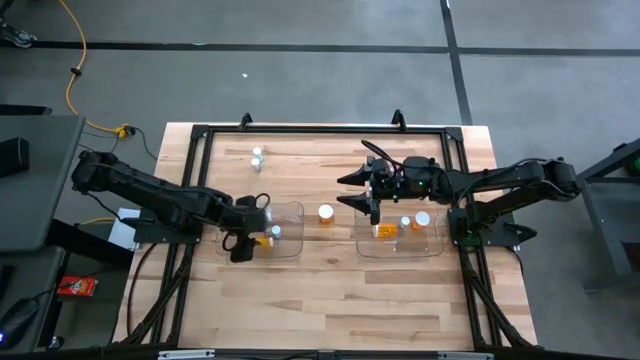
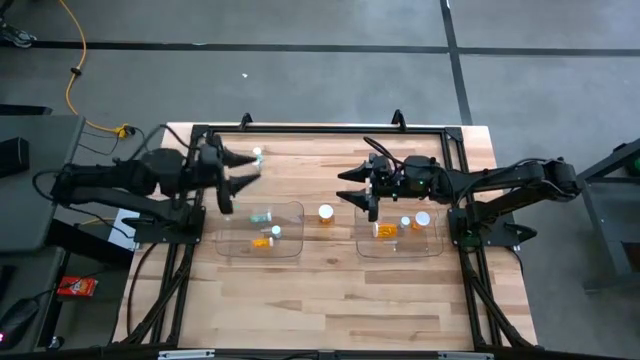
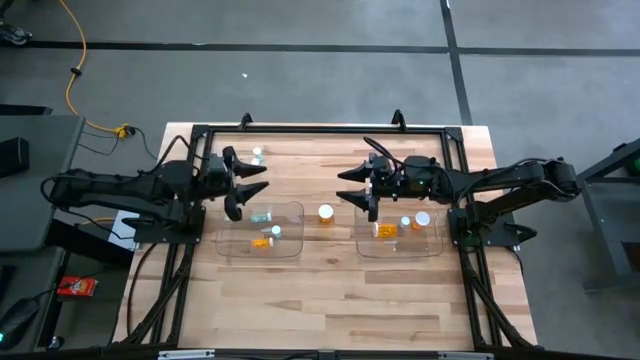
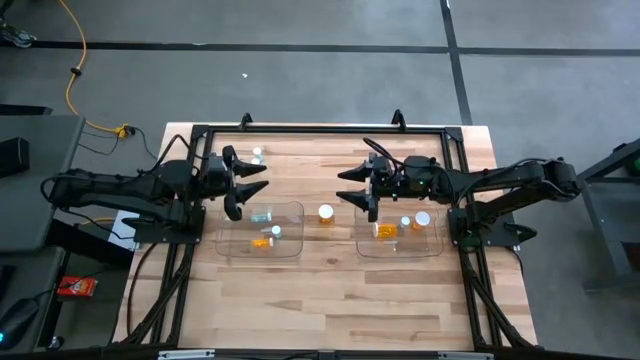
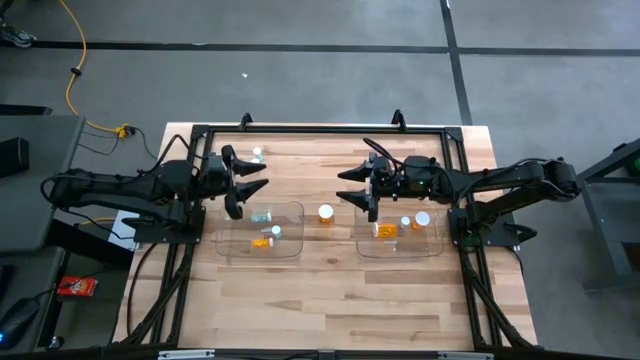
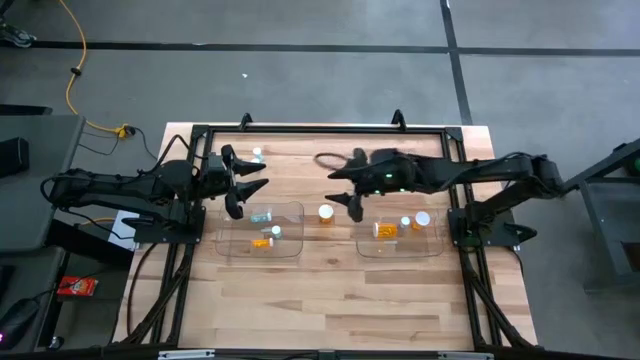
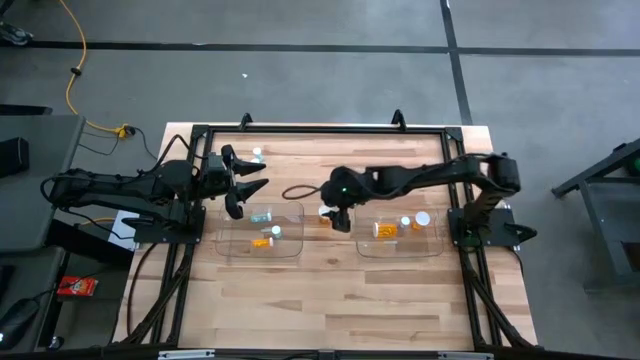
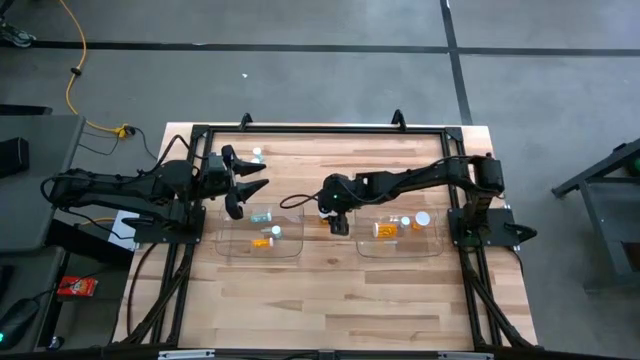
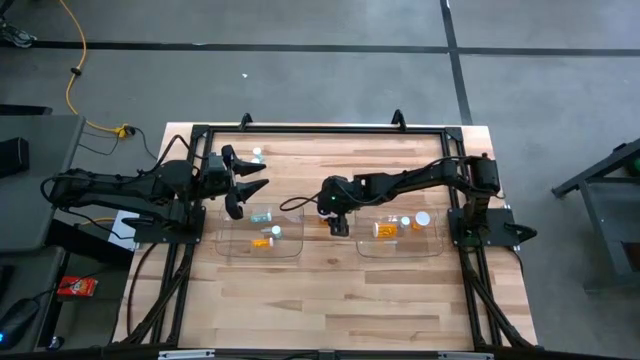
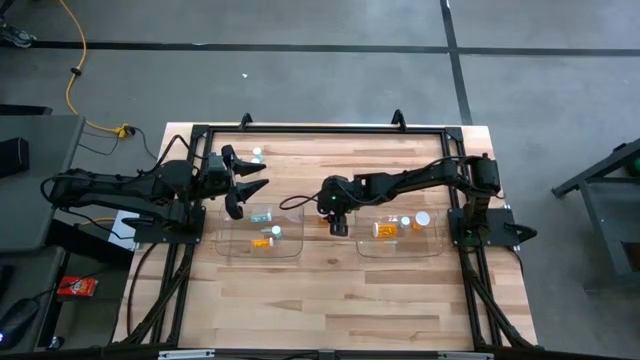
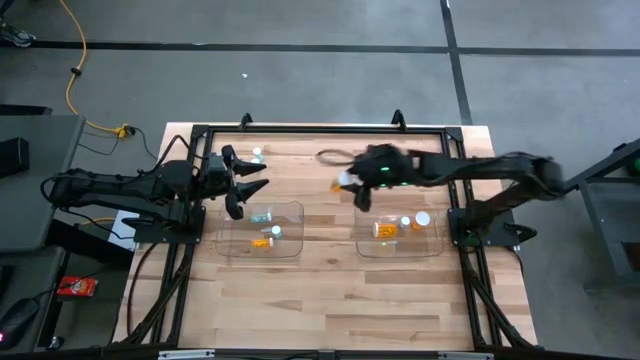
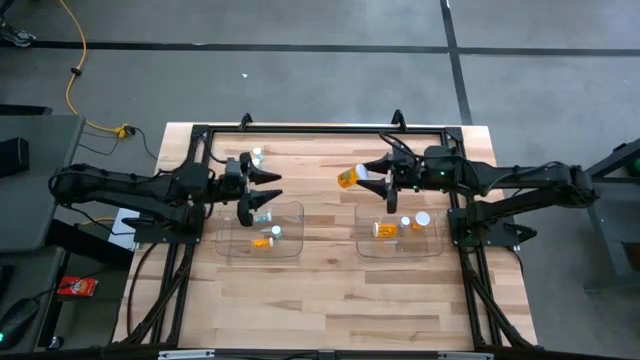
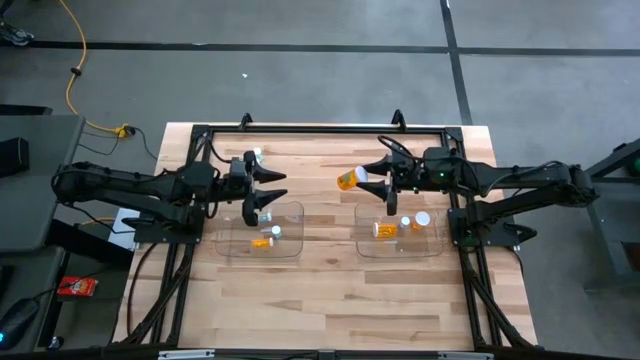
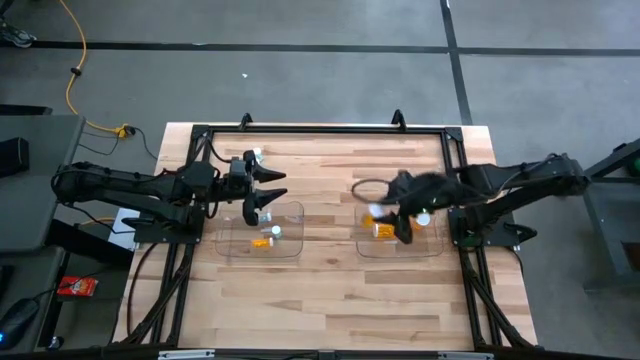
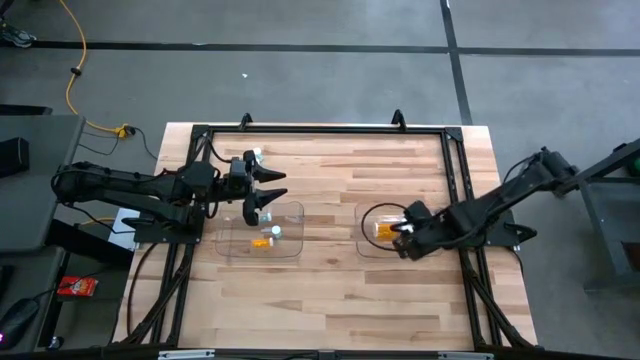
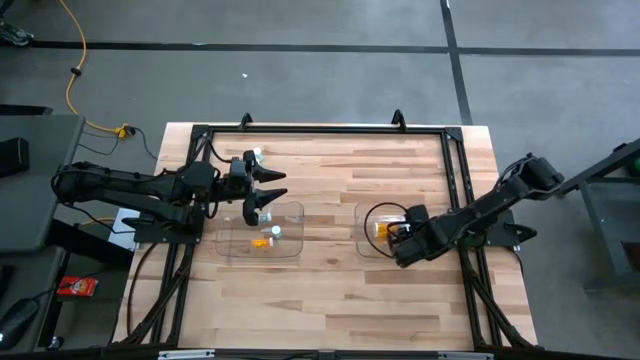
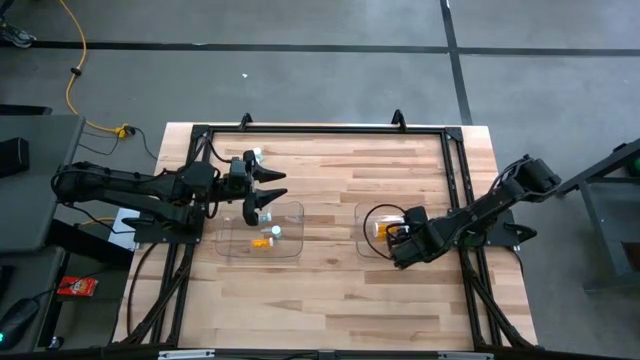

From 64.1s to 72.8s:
Task: Pick and place medicine bottles into bin by pill shape (circle, oval)
Put the orange capsule bottle into the right transparent bin

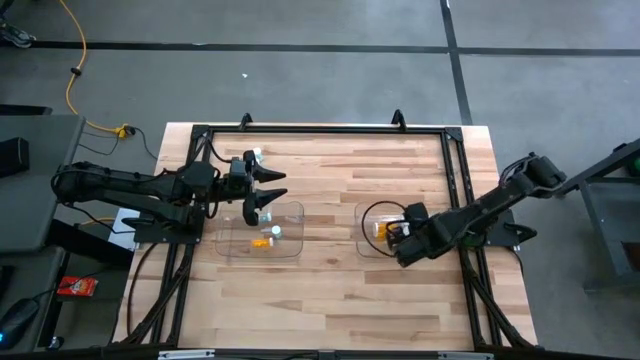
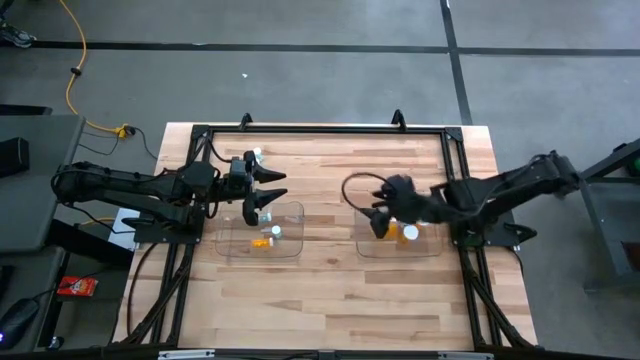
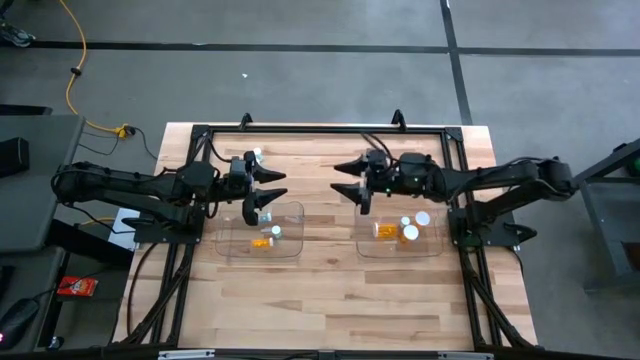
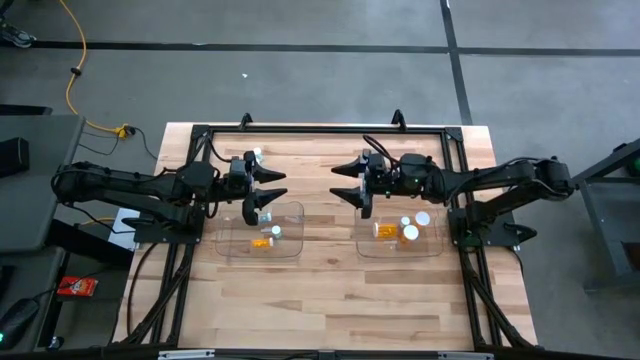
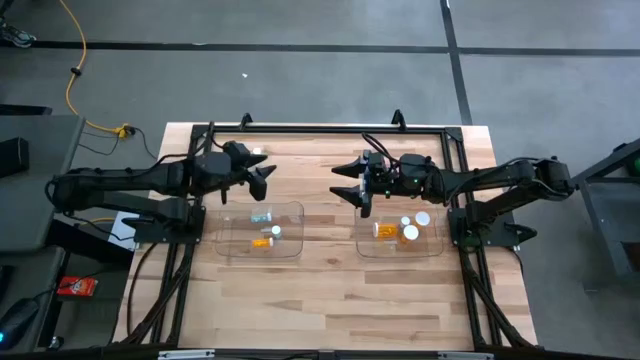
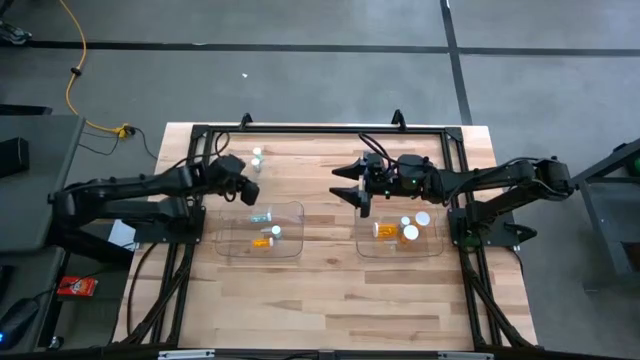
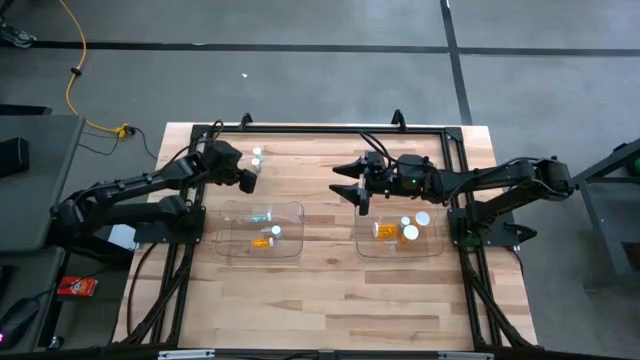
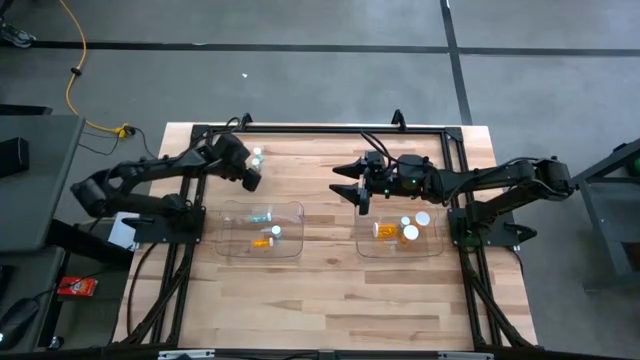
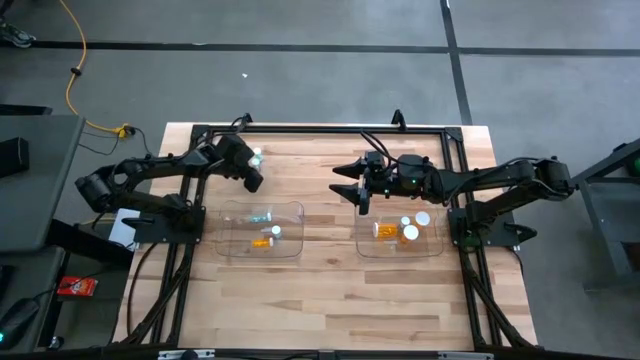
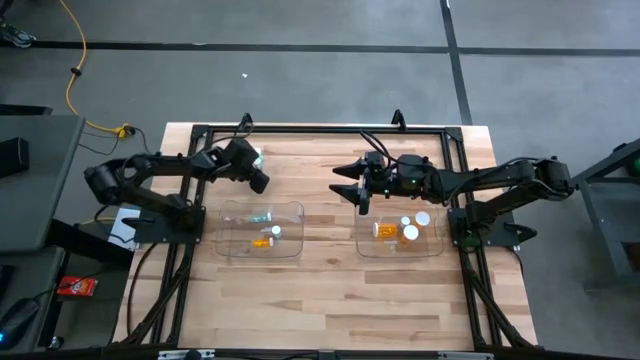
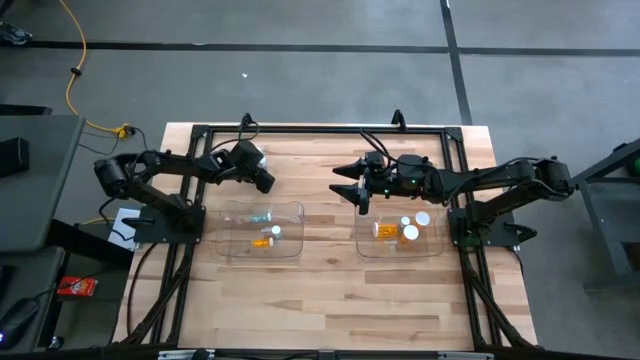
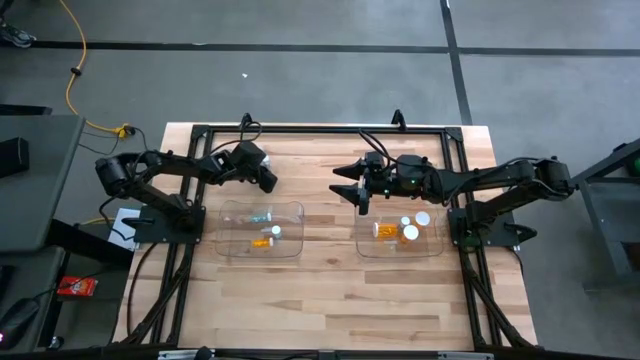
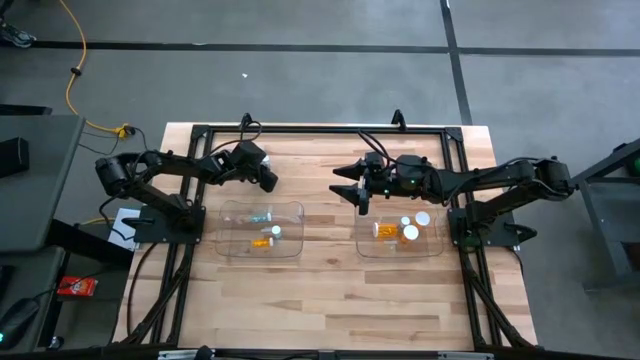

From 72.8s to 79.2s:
Put the blue capsule bottle into the right transparent bin

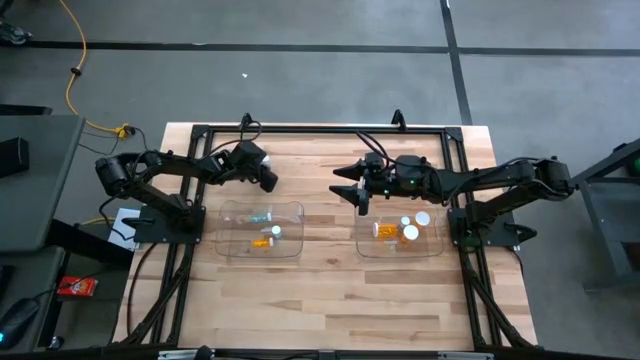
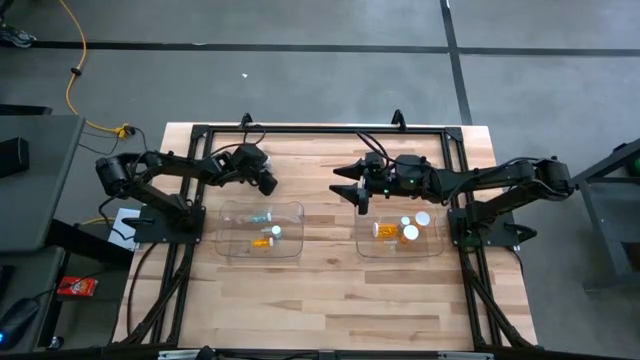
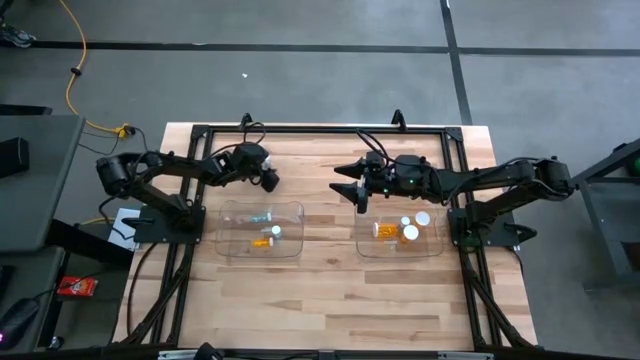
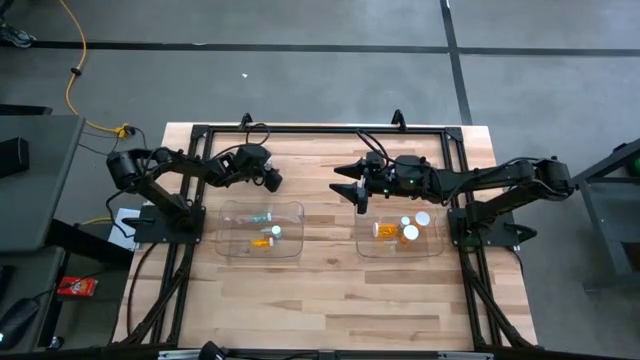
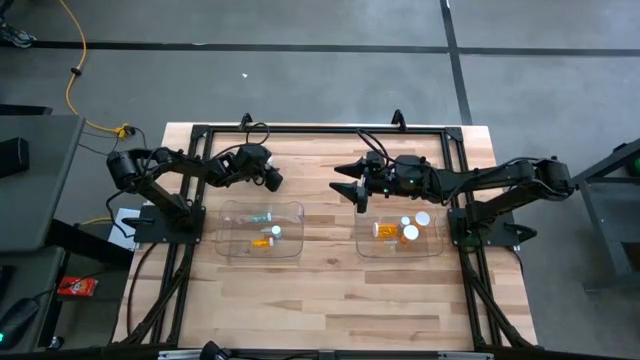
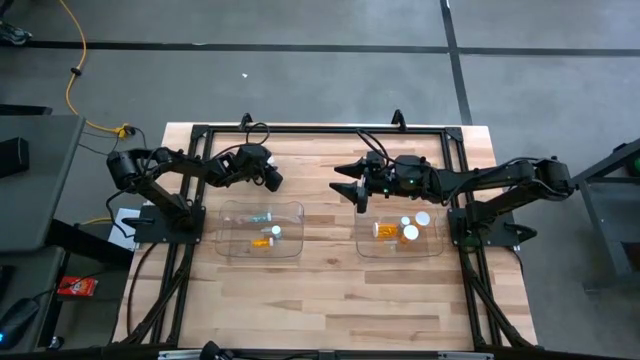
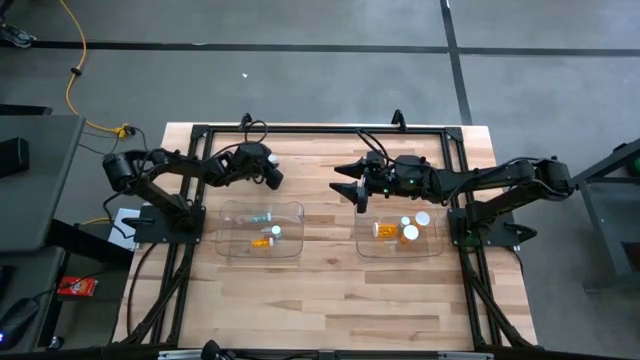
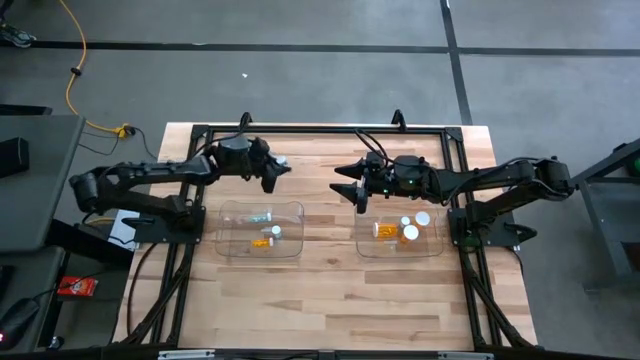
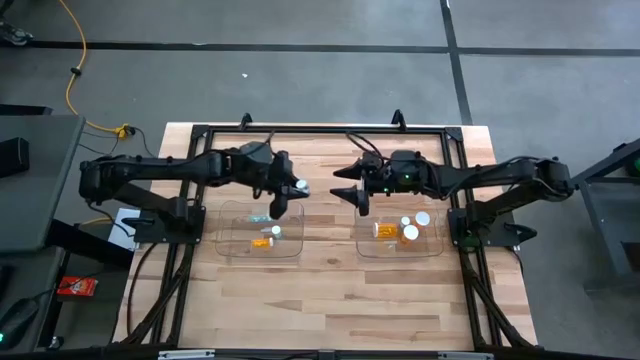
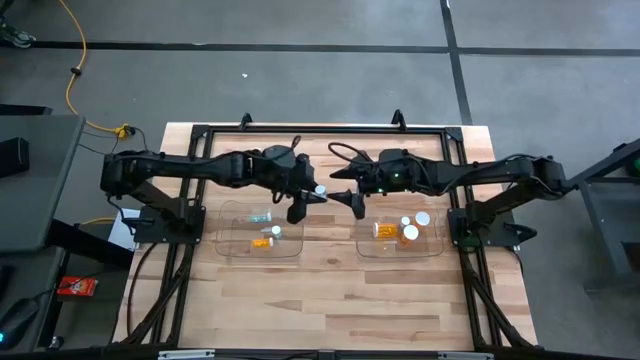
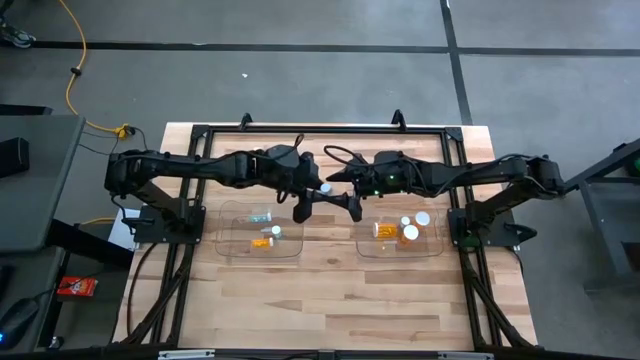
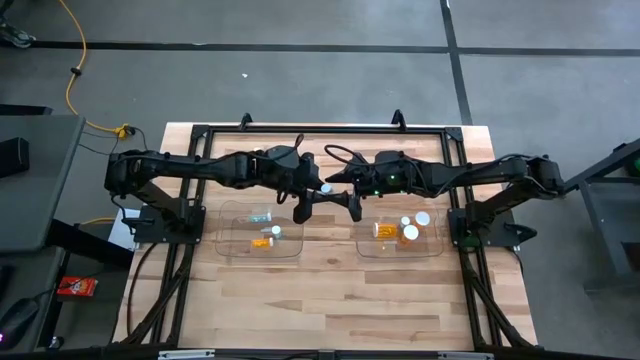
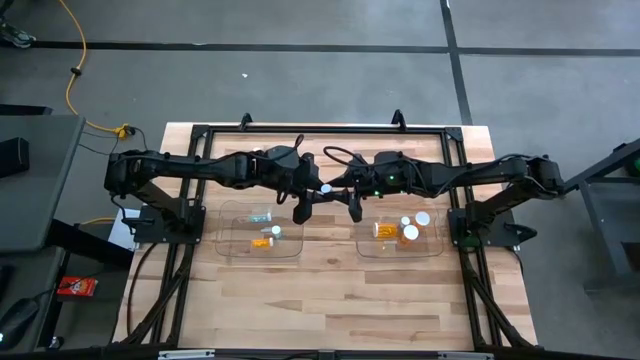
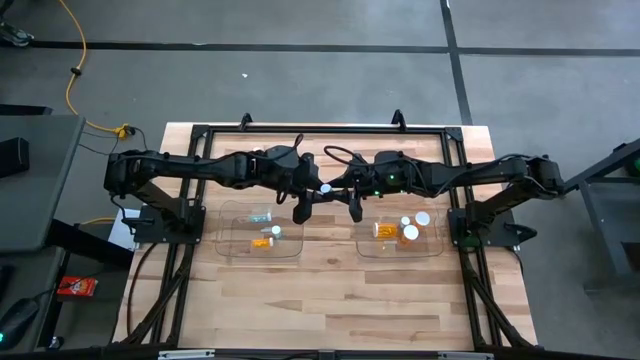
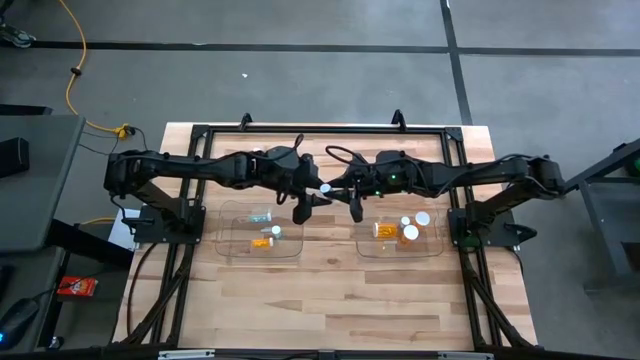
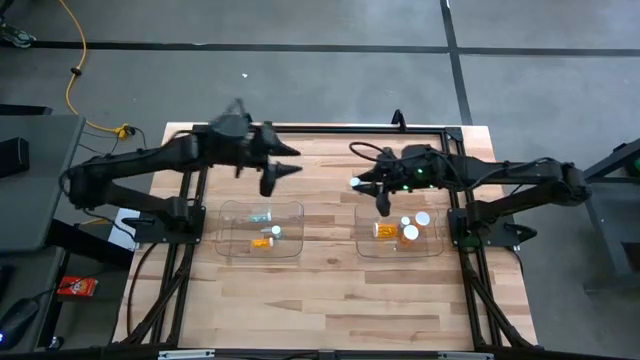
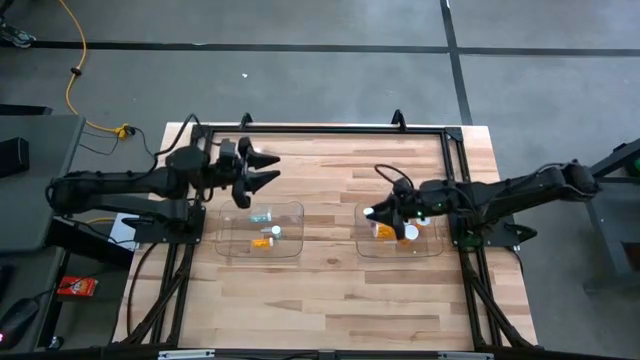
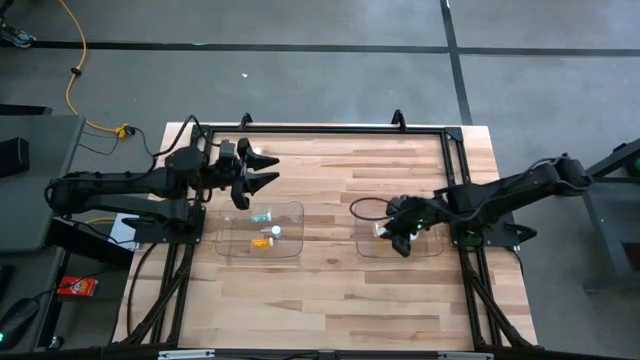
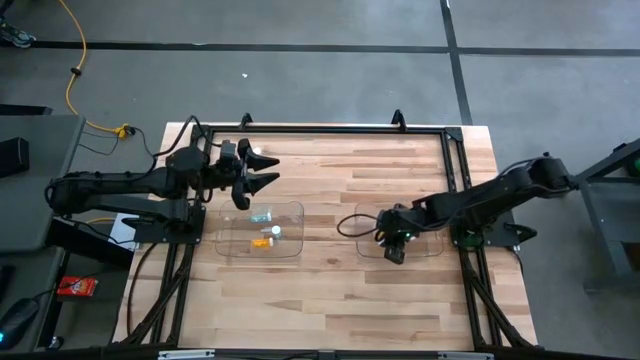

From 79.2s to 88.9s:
Put the blue capsule bottle into the right transparent bin
